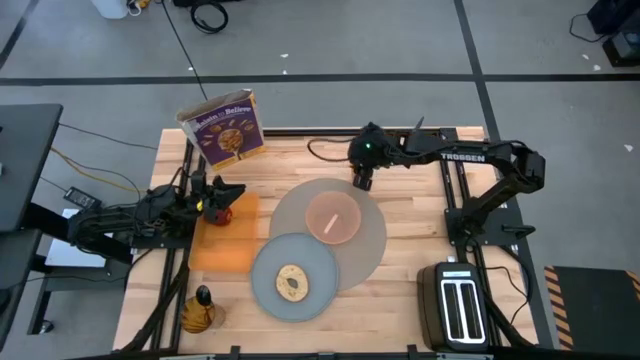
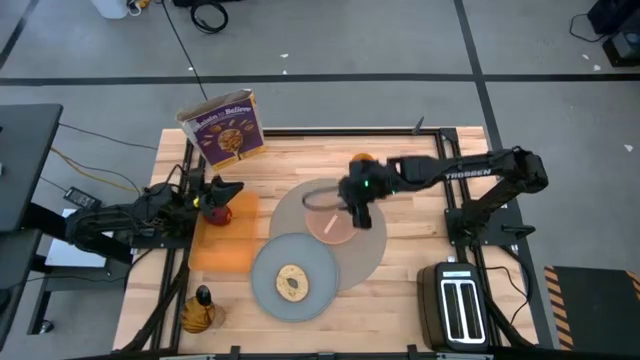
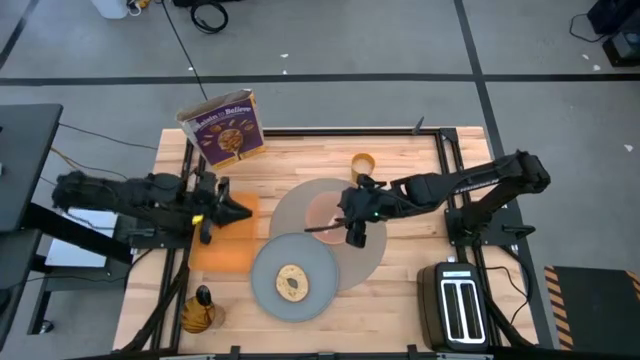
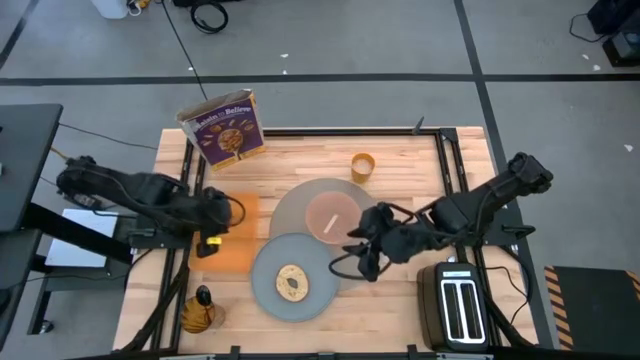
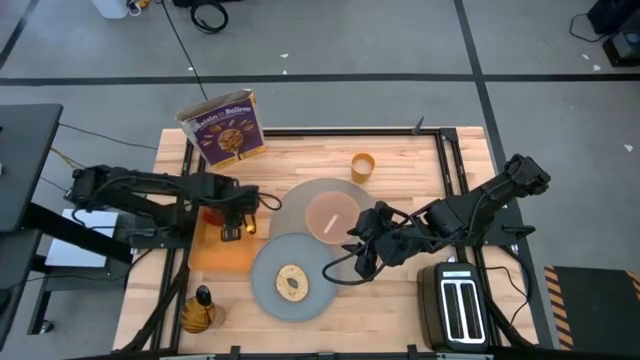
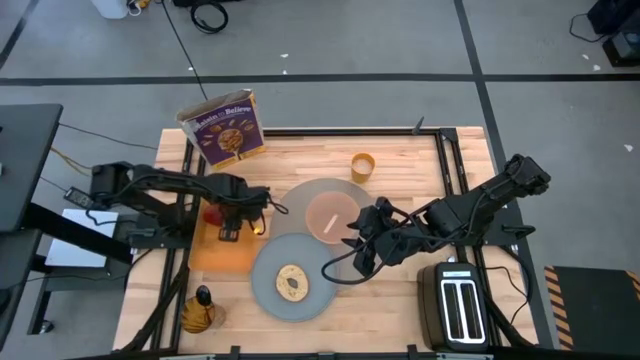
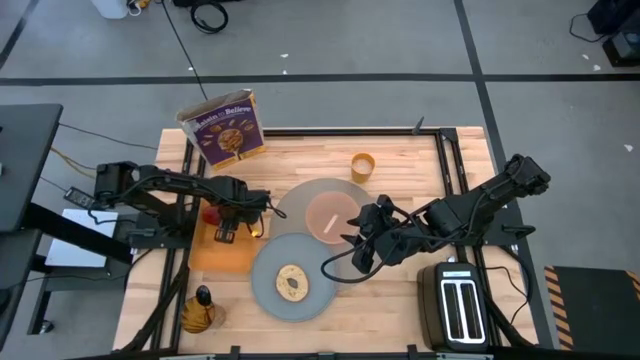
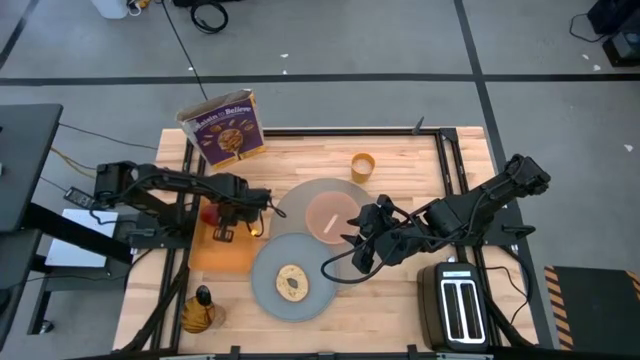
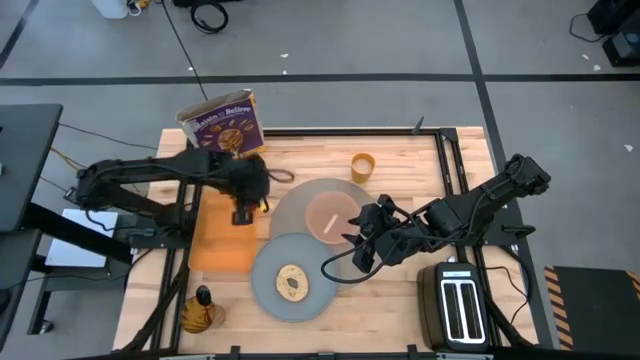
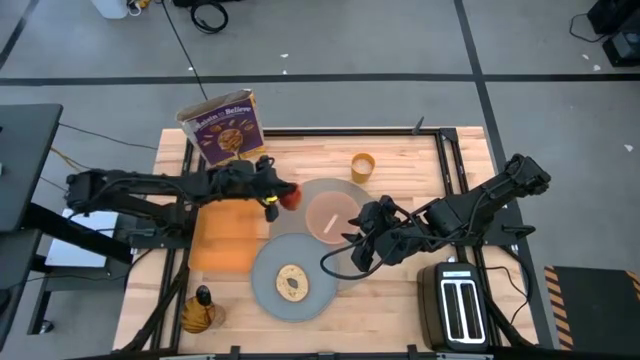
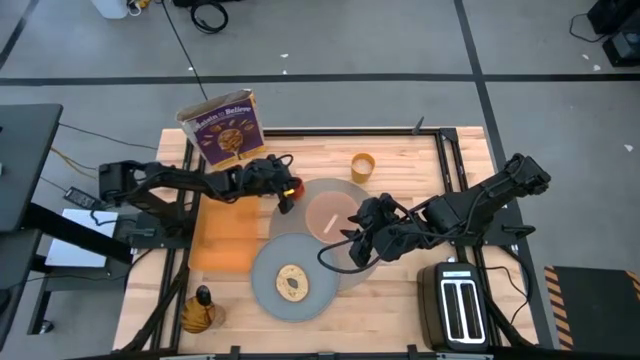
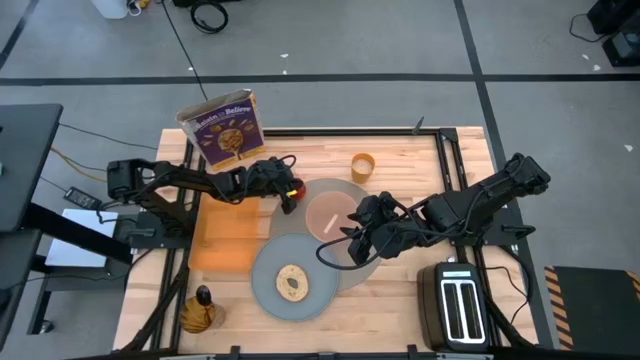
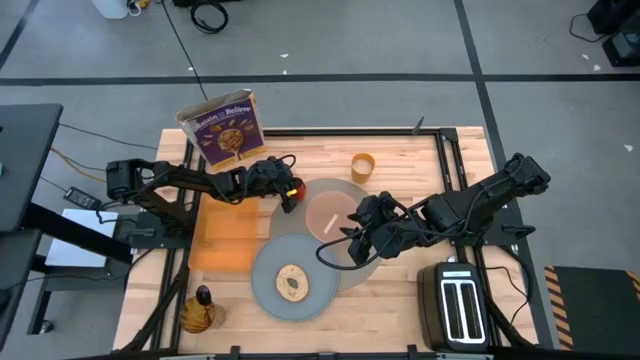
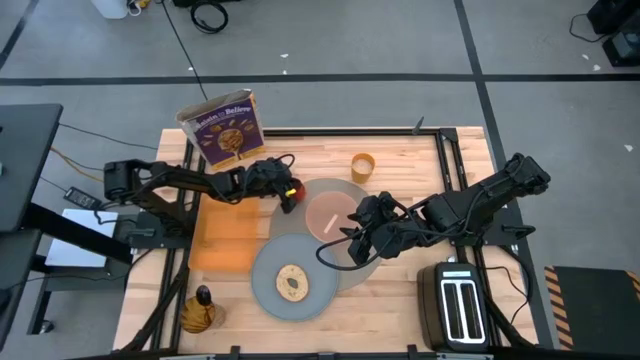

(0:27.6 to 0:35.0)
Task: Arrange a breakfast setting
Put the red apple on the gray placemat to the top left of the pink bowl

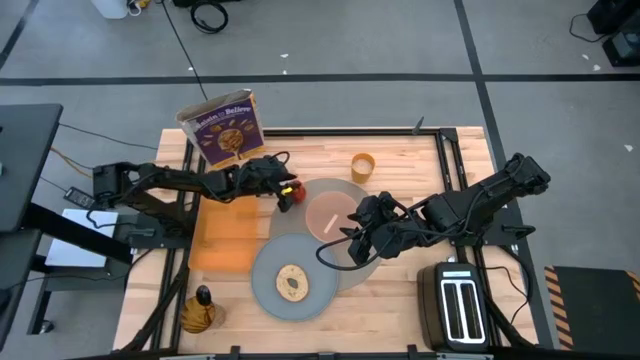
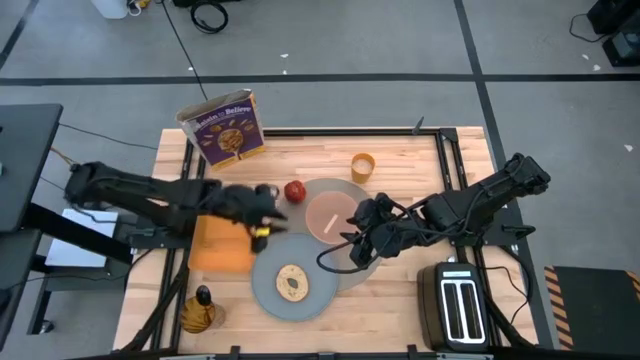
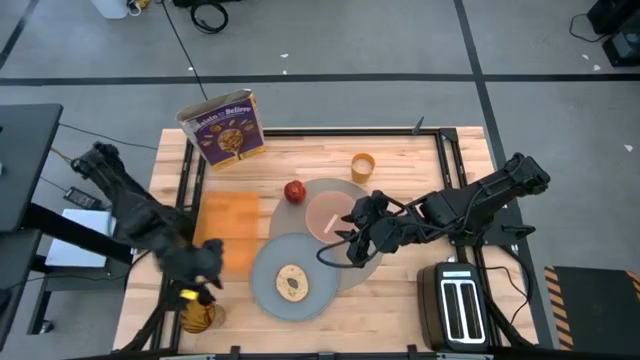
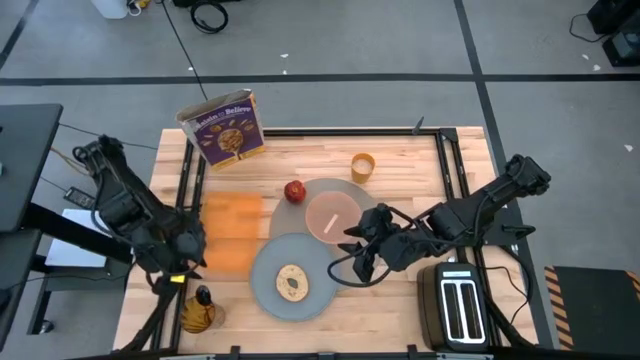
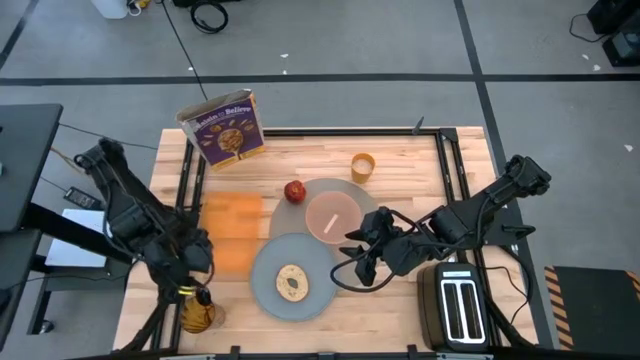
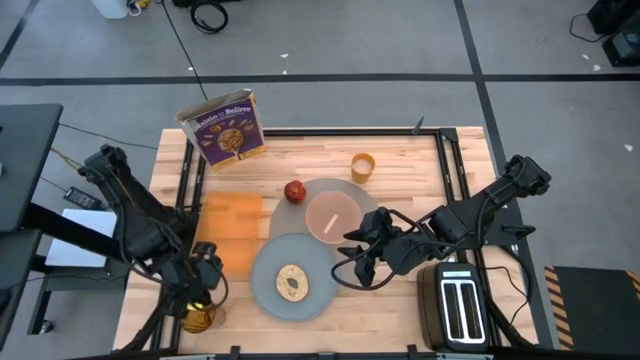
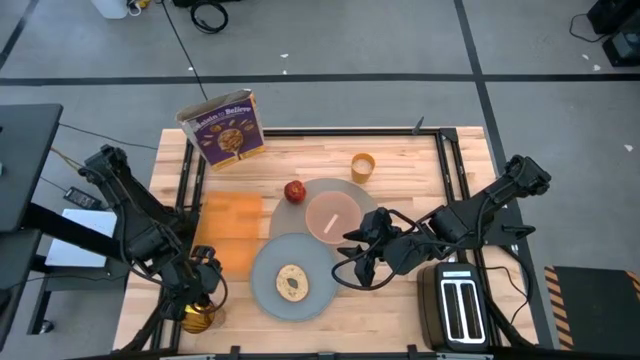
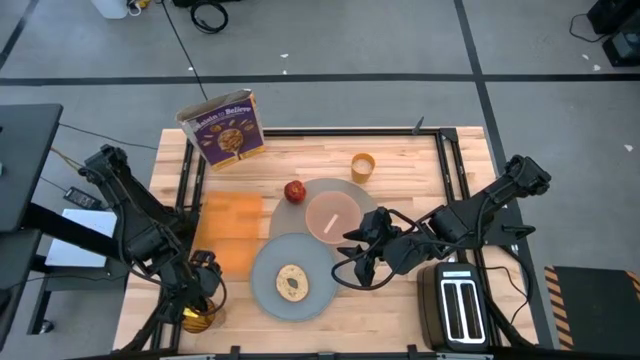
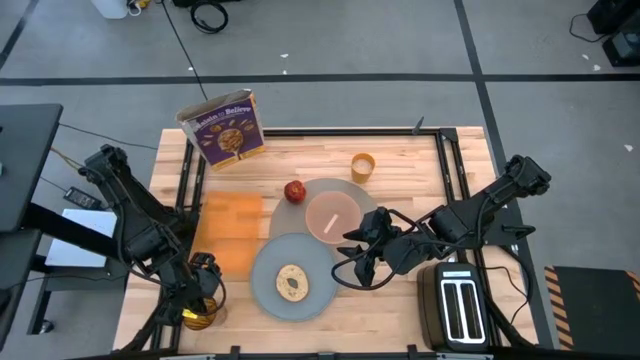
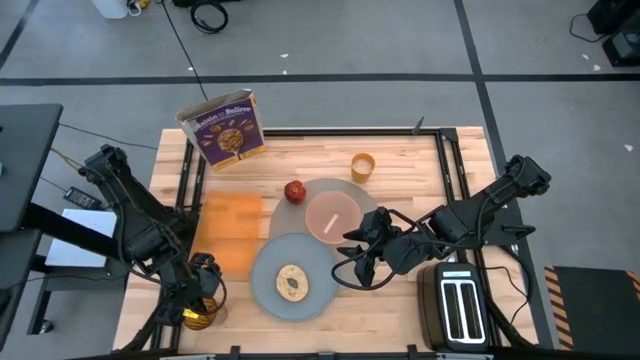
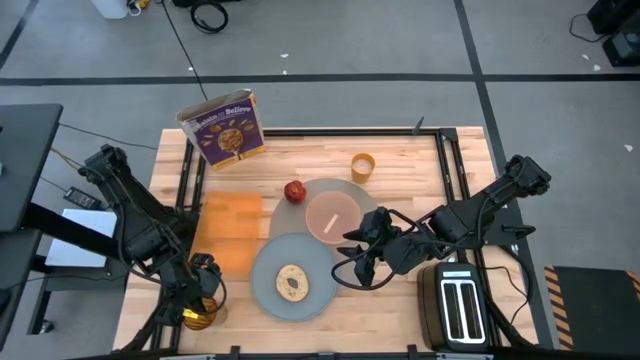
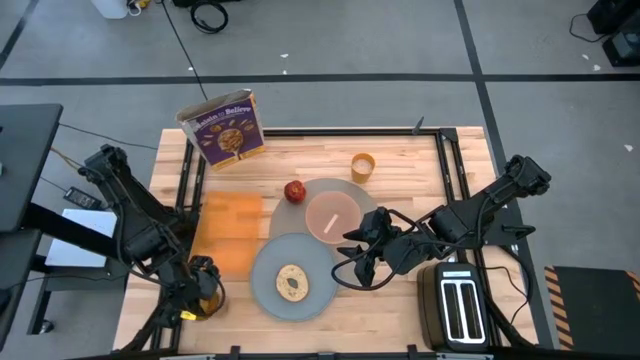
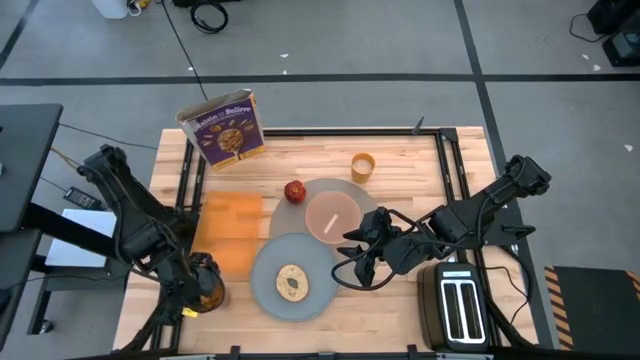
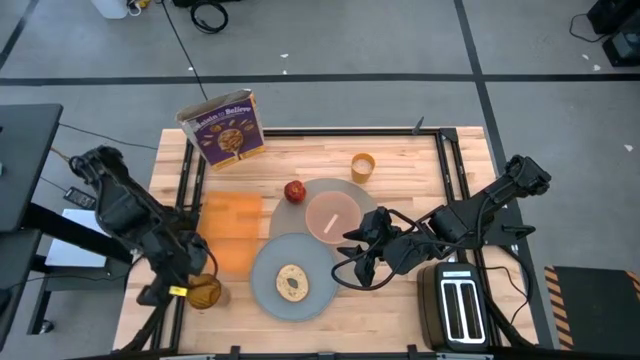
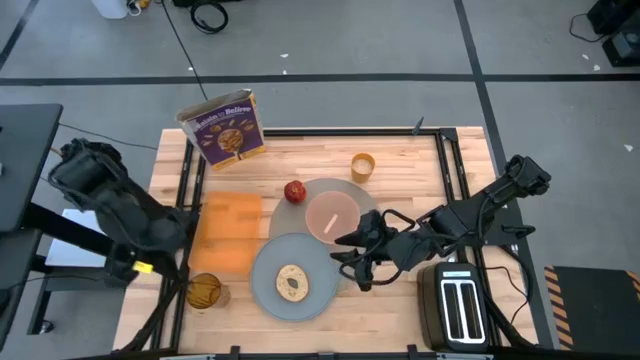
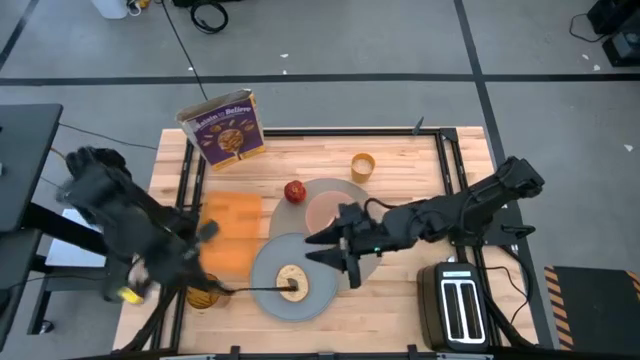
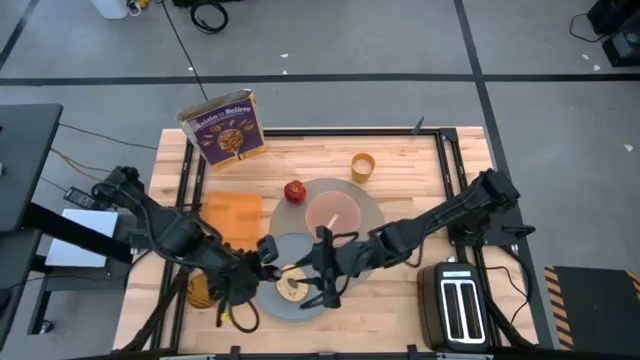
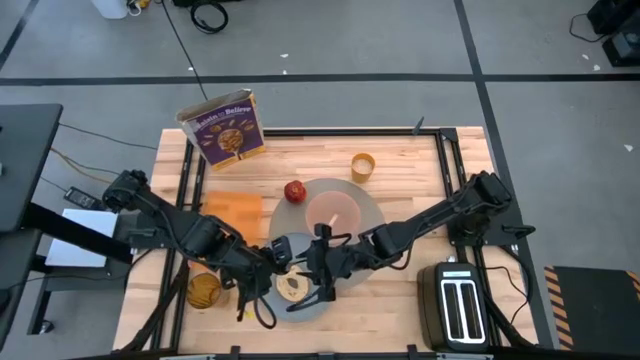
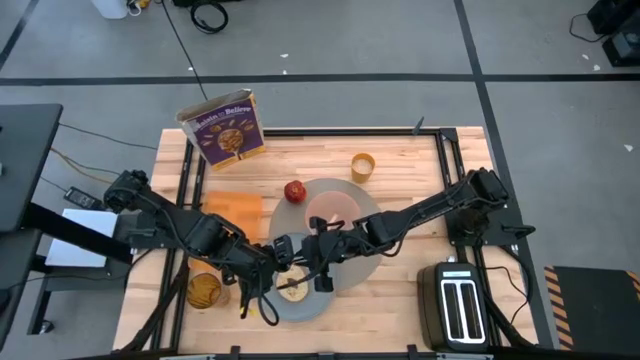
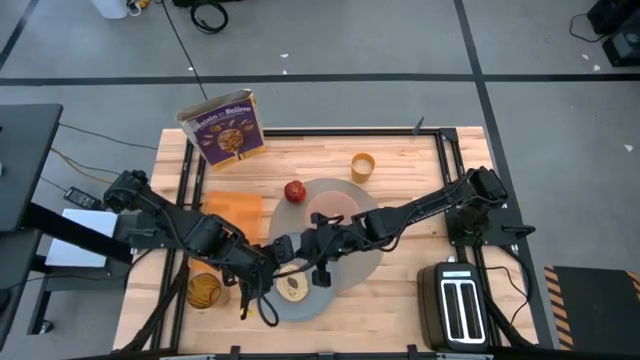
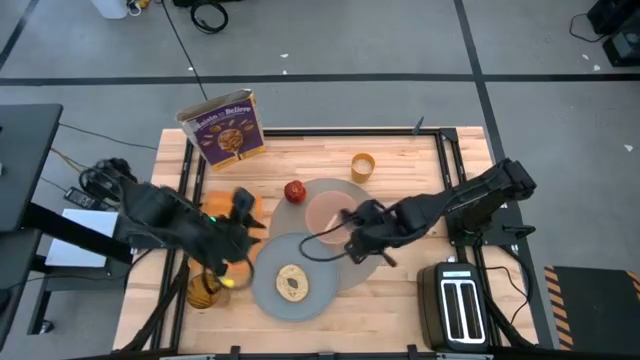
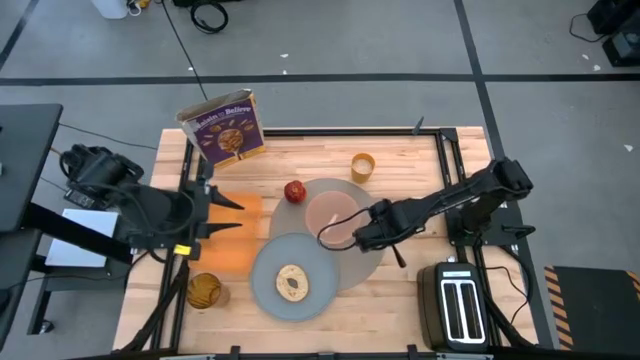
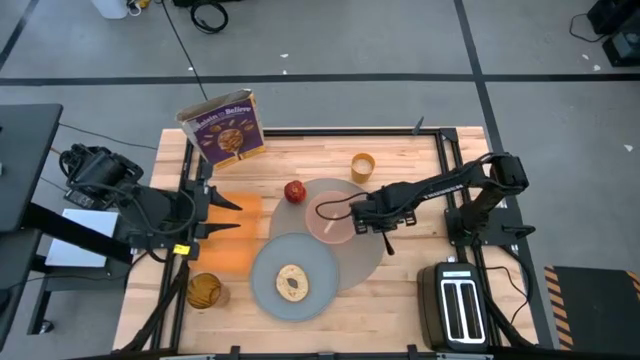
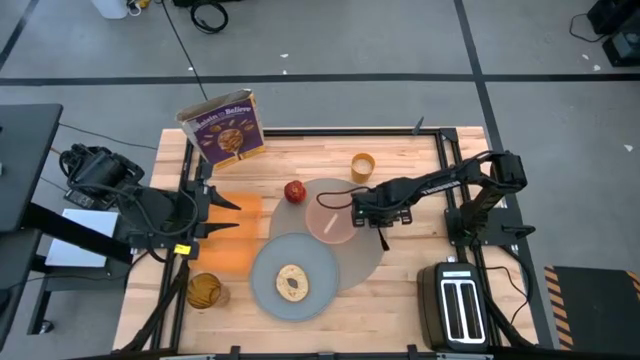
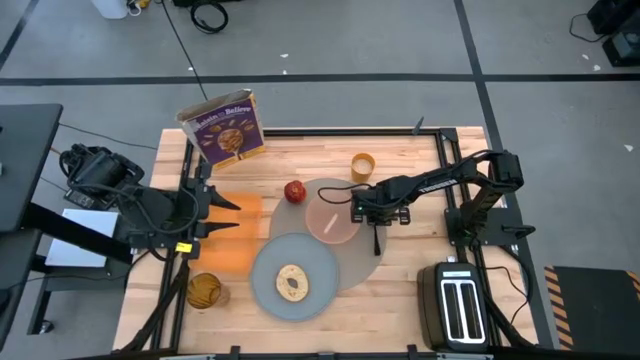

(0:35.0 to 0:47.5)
Put the black spoon on the gray placemat to the right of the pink bowl

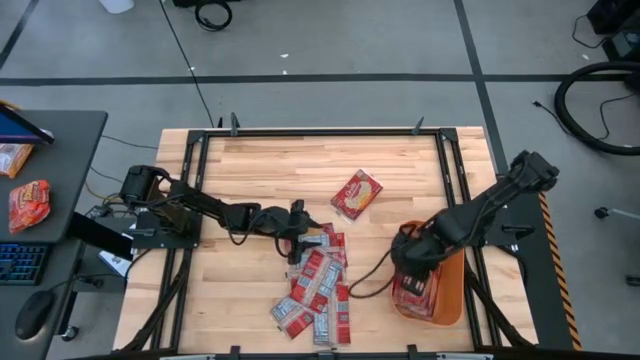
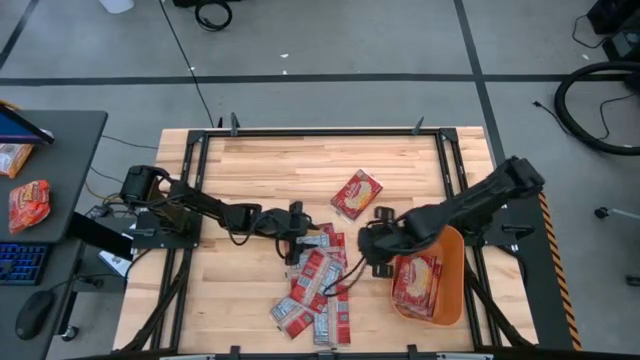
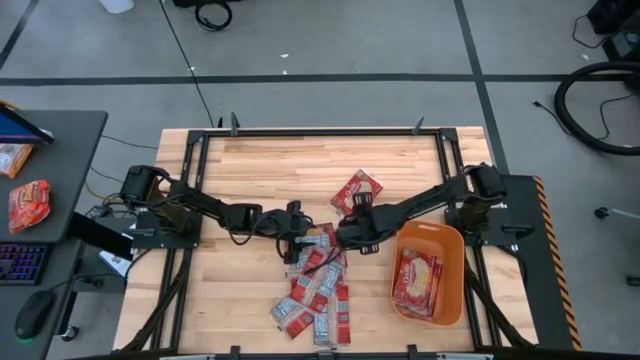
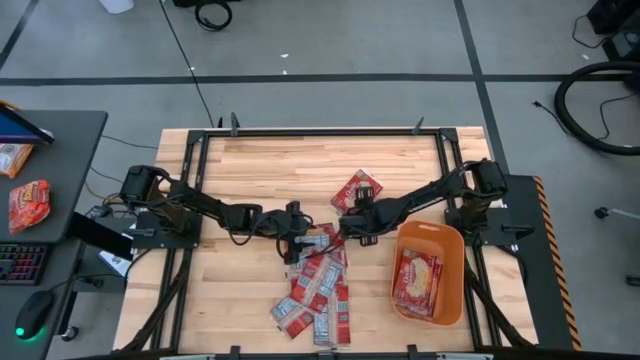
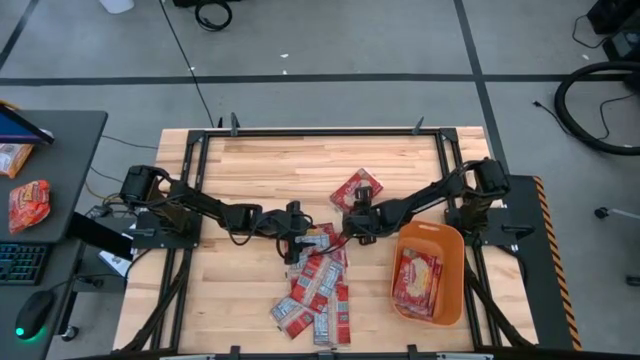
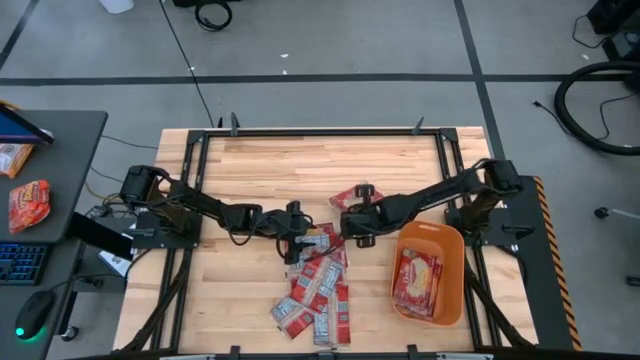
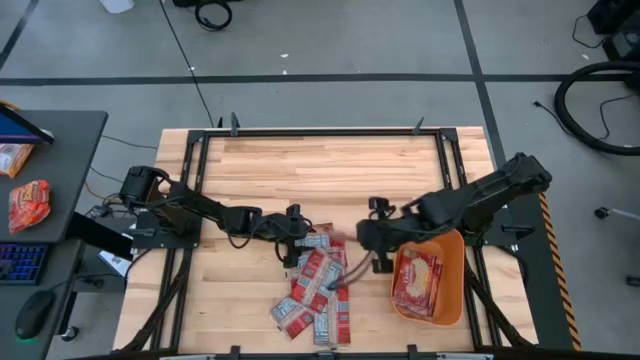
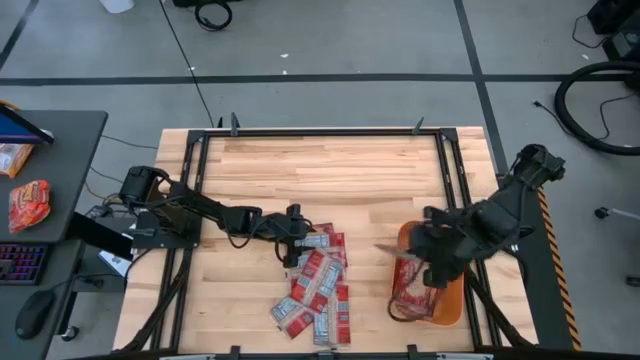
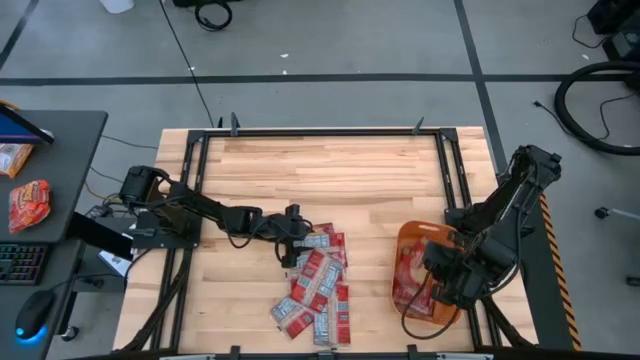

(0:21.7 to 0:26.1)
Task: Sort popcorn bags into baskets
Put the red popcorn bag into the orange bin
